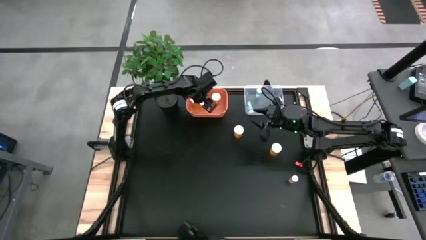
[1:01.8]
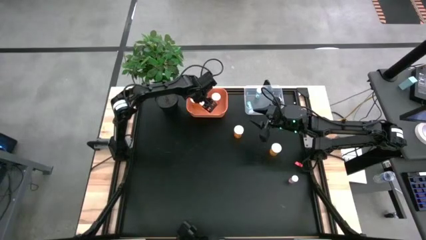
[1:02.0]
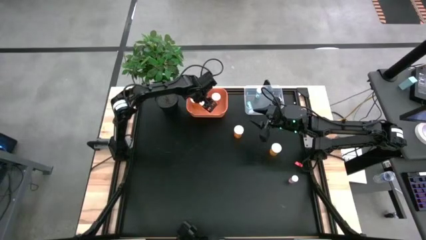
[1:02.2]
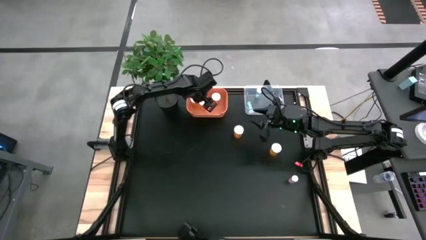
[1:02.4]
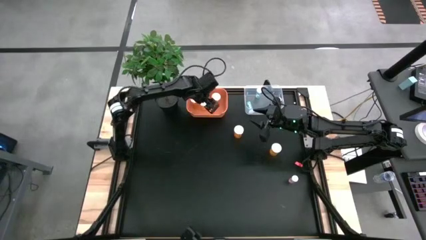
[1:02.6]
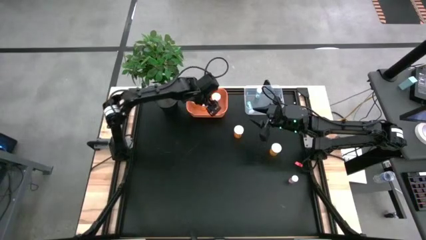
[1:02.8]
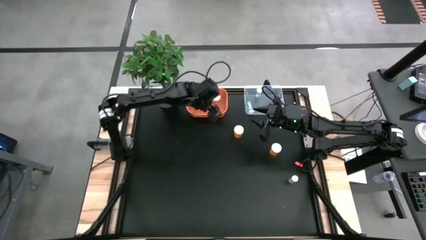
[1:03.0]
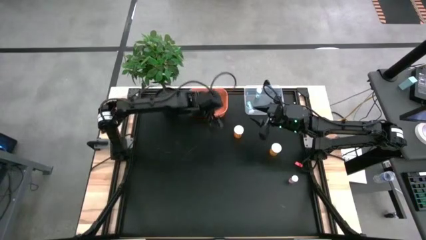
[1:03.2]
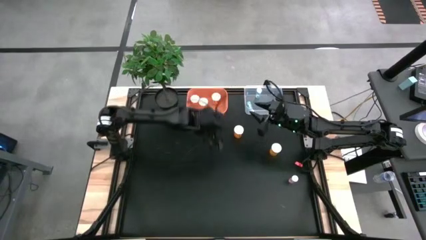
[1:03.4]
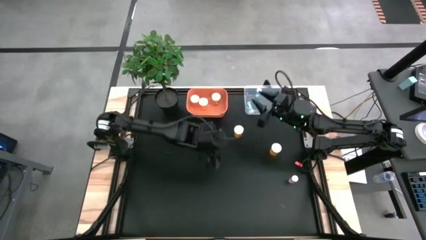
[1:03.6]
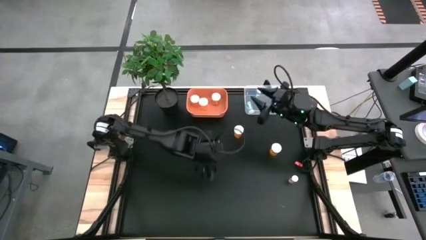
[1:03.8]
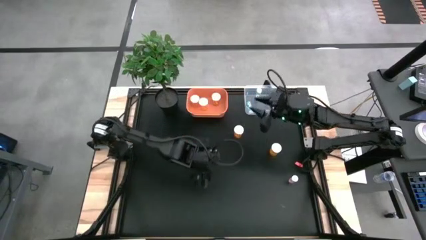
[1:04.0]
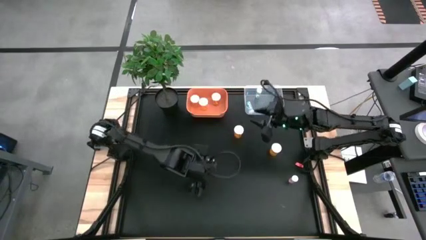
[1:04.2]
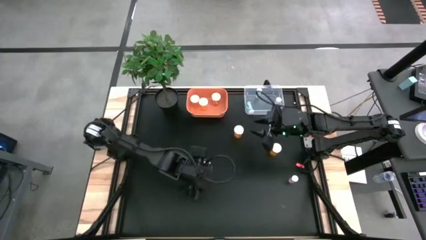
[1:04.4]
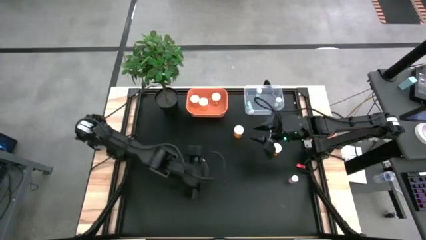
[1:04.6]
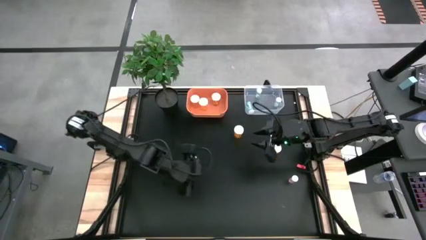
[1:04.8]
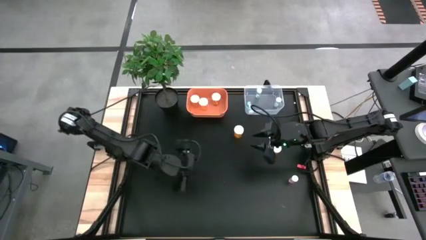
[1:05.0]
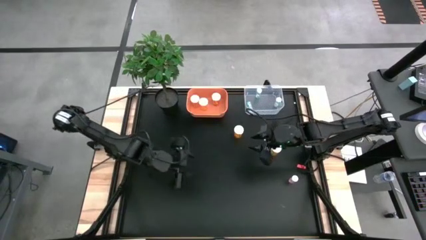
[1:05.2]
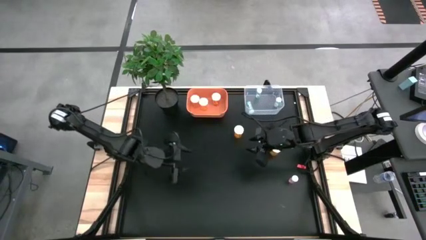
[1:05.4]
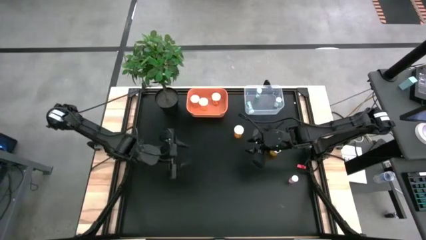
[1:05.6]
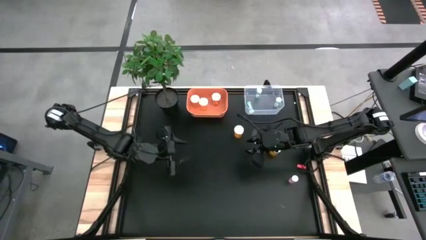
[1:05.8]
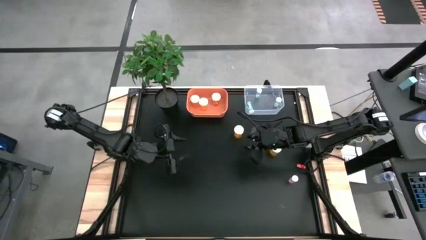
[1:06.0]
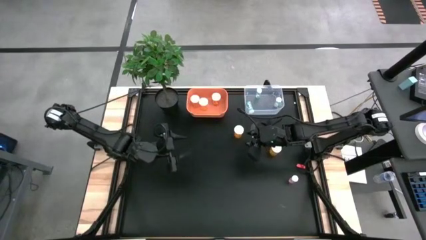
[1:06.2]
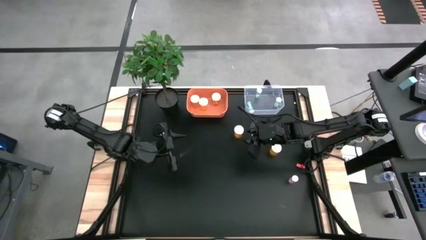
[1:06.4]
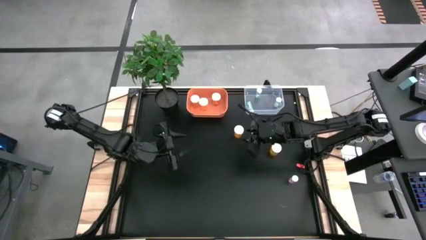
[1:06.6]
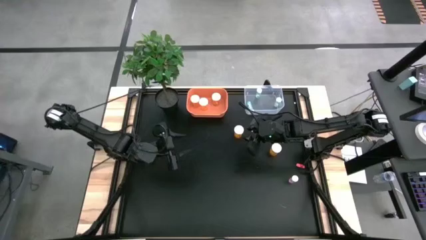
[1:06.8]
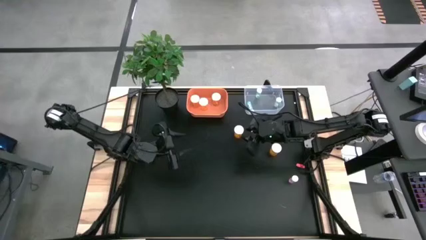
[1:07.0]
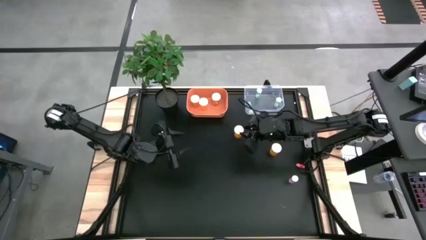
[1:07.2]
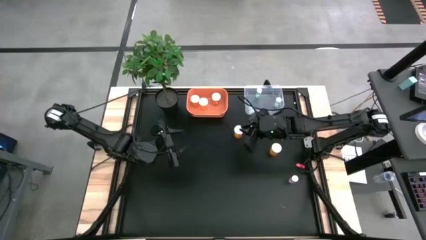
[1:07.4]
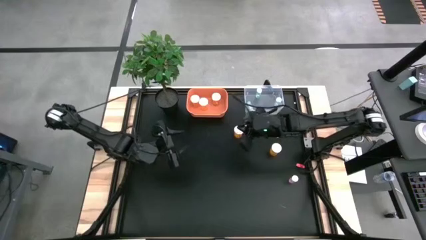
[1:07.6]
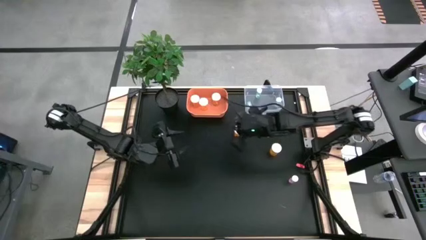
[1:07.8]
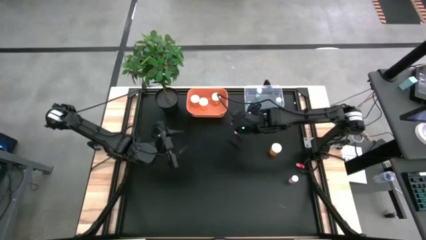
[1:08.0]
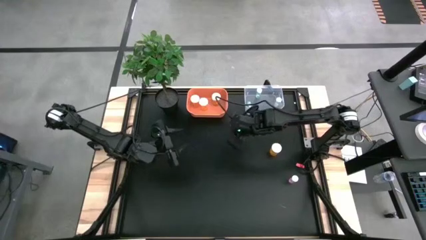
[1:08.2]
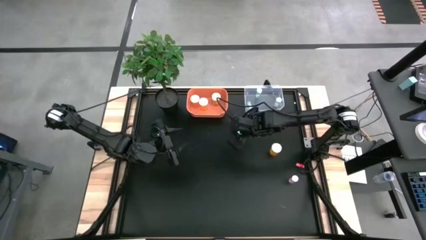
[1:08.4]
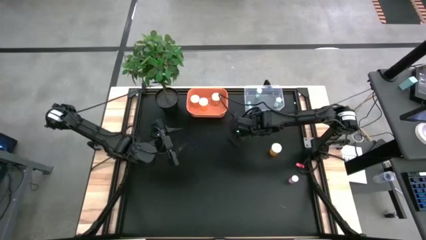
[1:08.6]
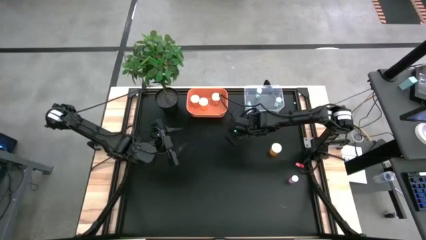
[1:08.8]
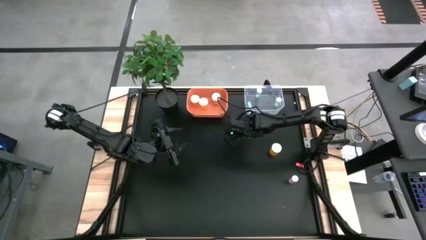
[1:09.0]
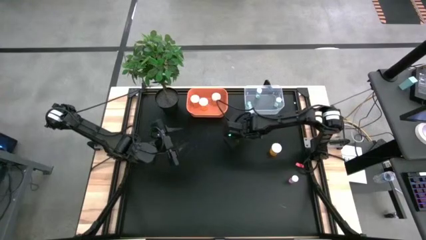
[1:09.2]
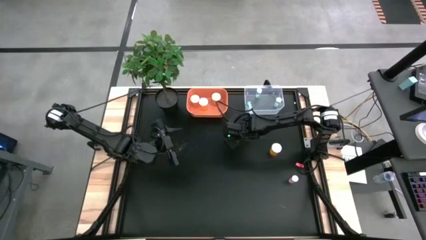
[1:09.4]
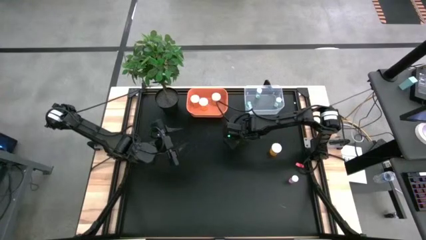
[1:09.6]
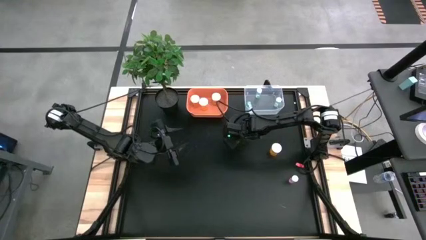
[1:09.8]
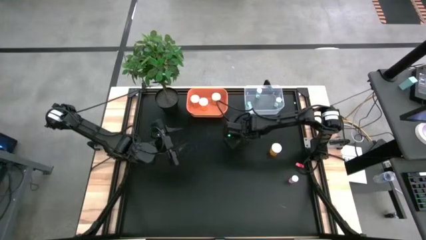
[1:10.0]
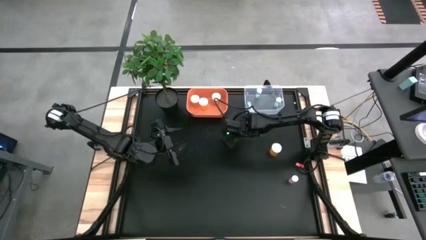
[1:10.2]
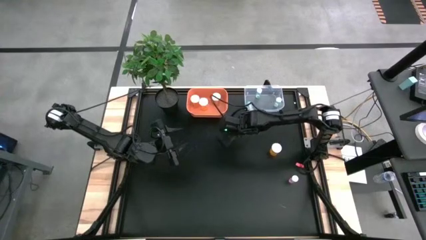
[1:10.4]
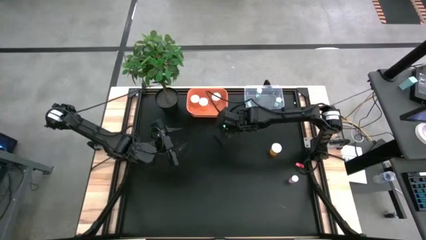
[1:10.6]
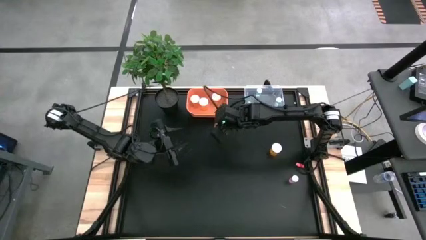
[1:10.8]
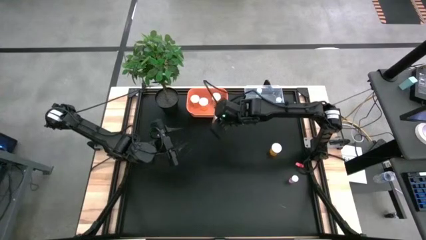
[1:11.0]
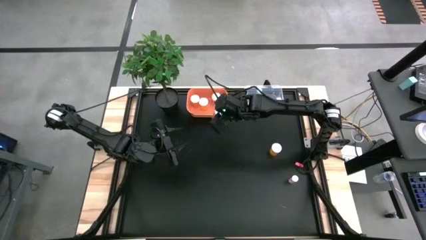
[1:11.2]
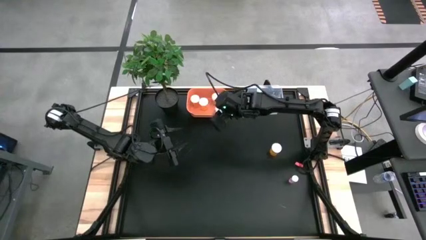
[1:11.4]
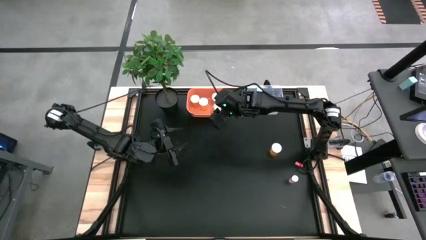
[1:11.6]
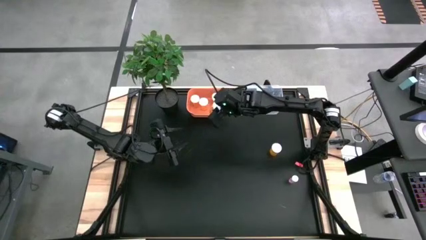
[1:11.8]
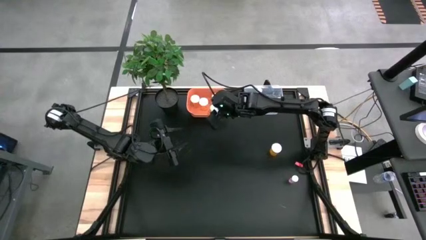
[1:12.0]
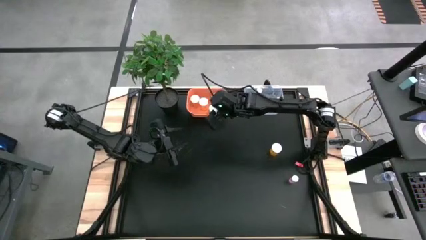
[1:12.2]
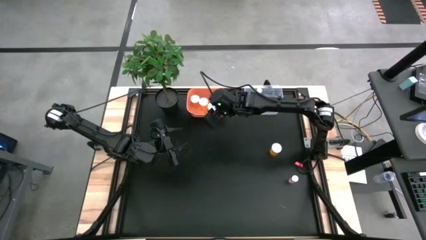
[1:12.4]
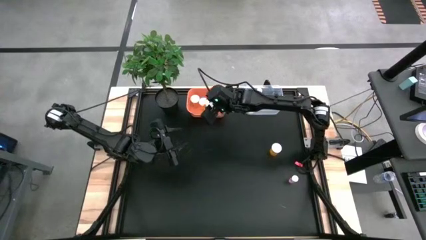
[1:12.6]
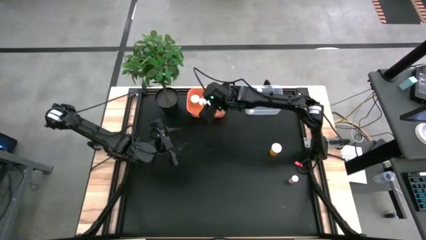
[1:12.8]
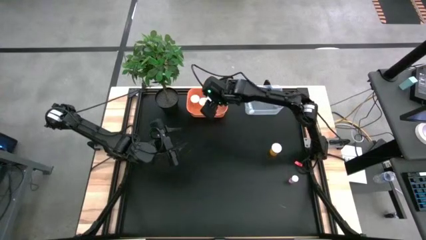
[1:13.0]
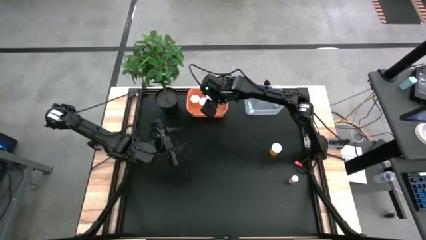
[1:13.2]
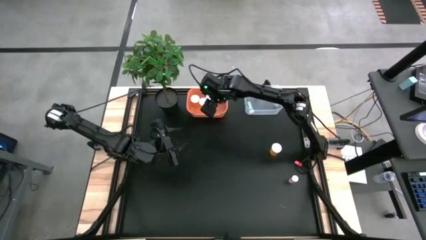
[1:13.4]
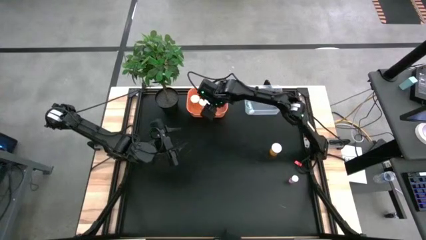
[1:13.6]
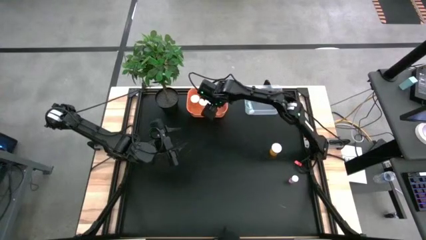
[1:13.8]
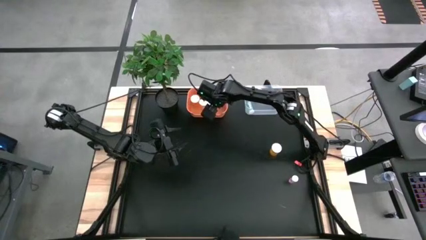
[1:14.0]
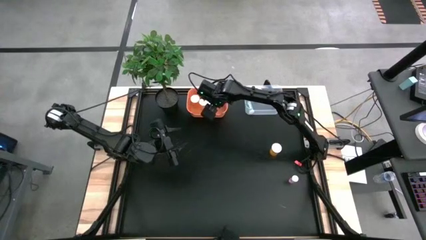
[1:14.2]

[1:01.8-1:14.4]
Task: Pick and place medicine bottles into bin by pill shape (circle, oval)
Put the orange pill bottle into the orange bin

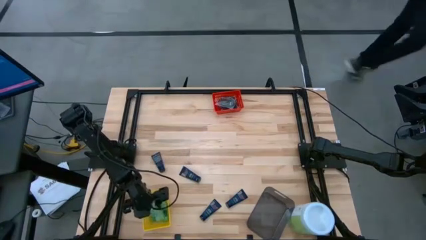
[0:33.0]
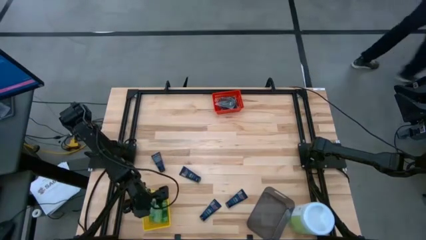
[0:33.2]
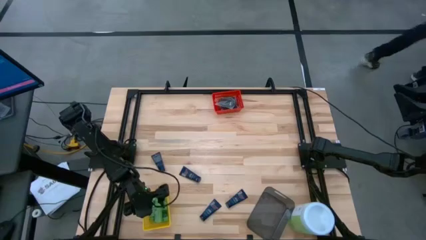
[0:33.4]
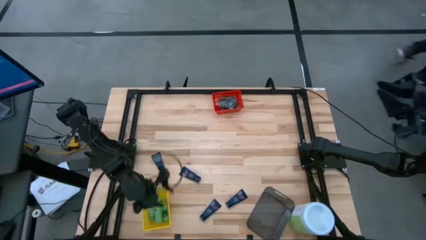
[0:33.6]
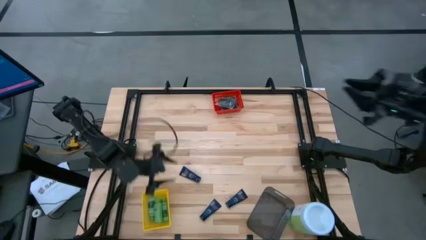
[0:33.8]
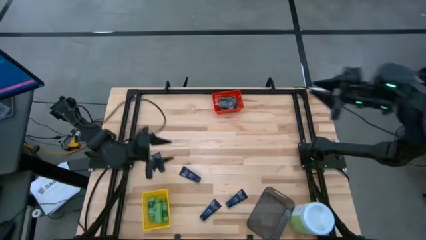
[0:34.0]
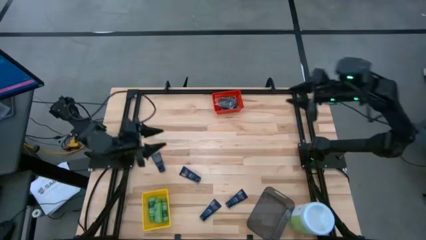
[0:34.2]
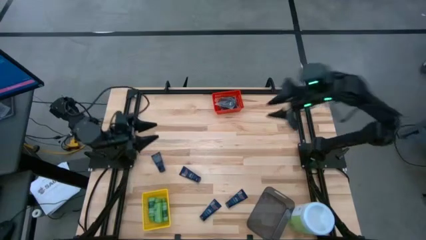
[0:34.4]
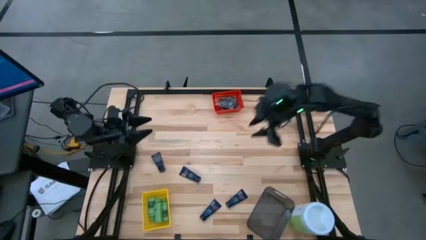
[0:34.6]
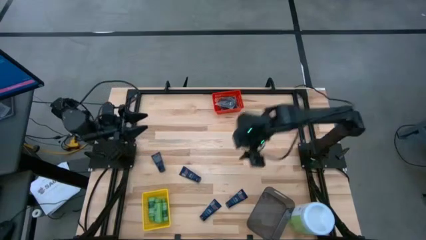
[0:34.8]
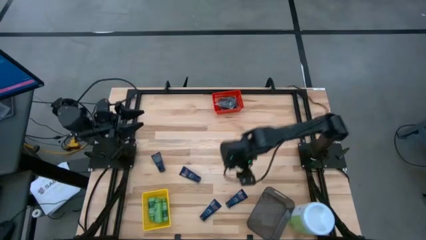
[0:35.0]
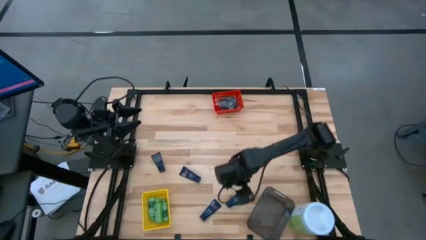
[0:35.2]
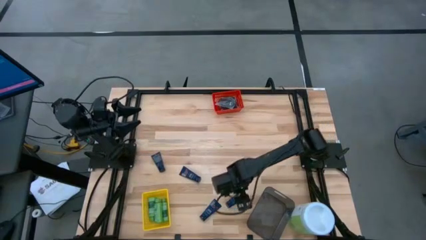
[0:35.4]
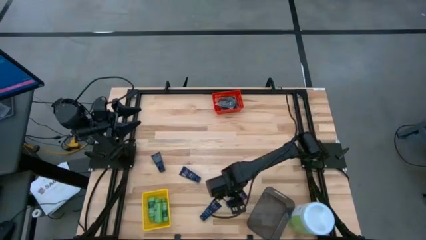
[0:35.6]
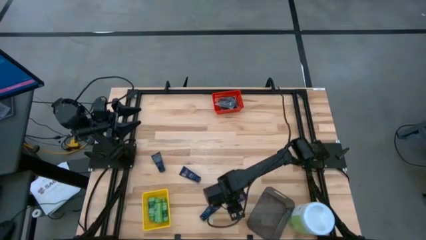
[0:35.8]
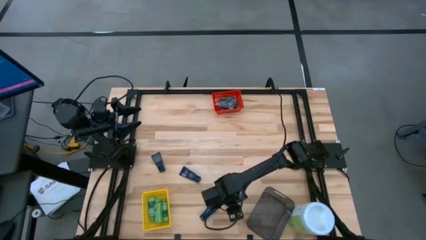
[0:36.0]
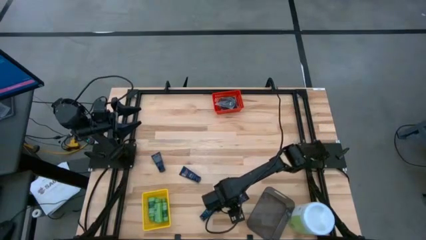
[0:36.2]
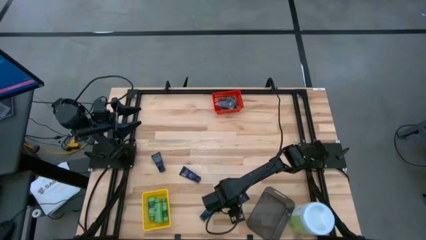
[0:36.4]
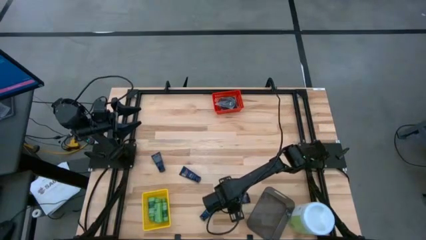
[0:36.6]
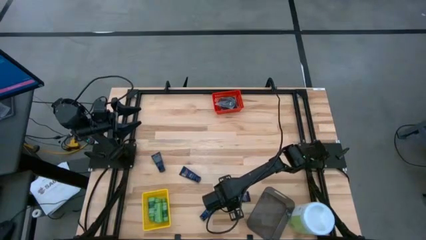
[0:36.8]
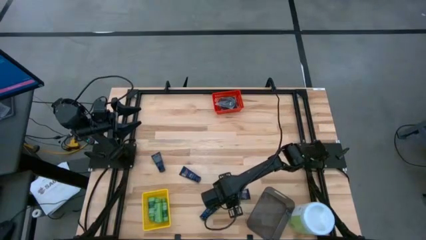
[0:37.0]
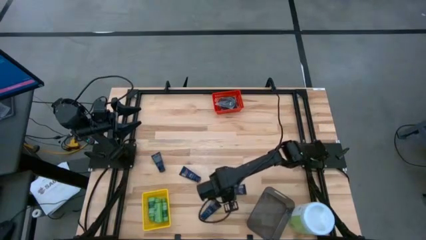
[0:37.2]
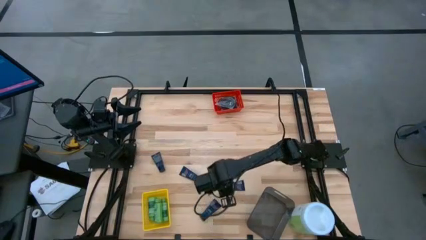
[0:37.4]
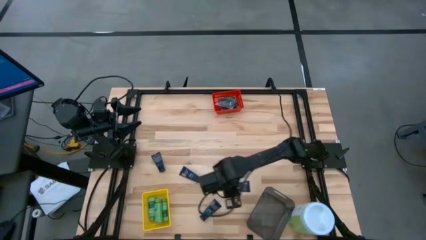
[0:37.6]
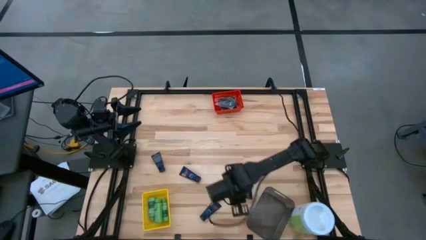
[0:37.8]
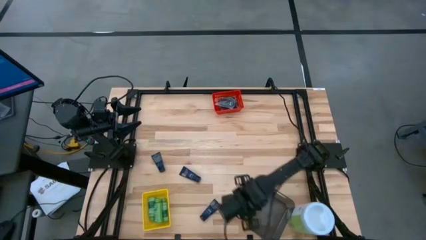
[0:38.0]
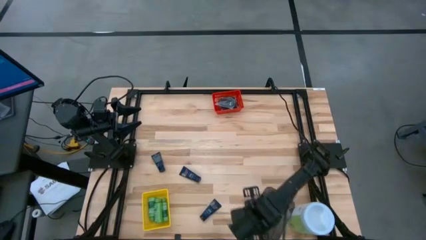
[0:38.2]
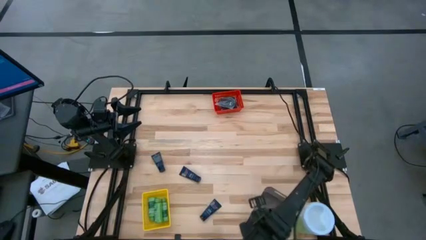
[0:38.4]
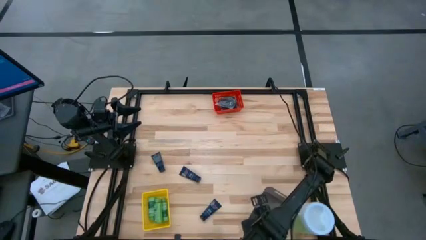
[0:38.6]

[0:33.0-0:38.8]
Task: Pick & Place Travel size toiletries
Put the blue shave cream into the black bin
